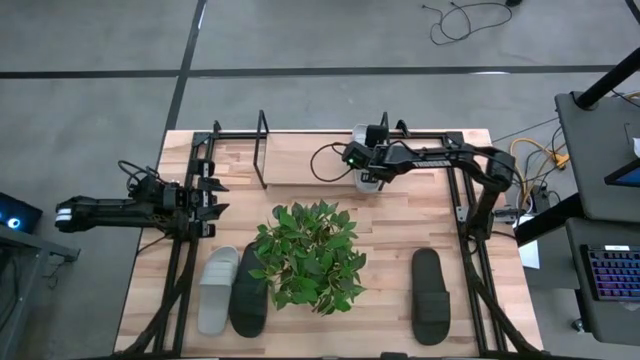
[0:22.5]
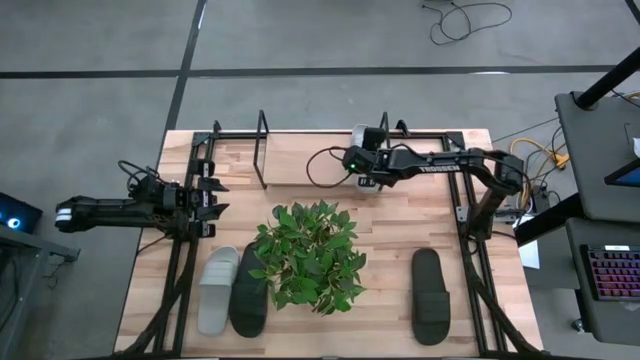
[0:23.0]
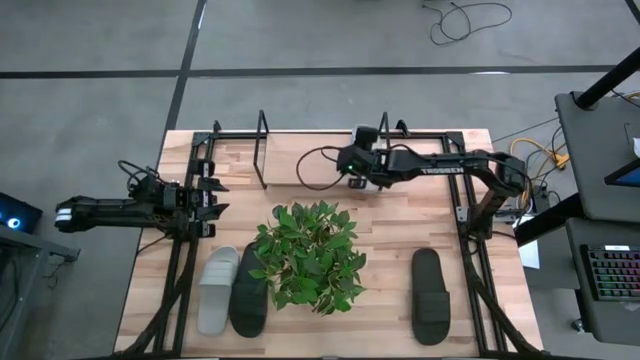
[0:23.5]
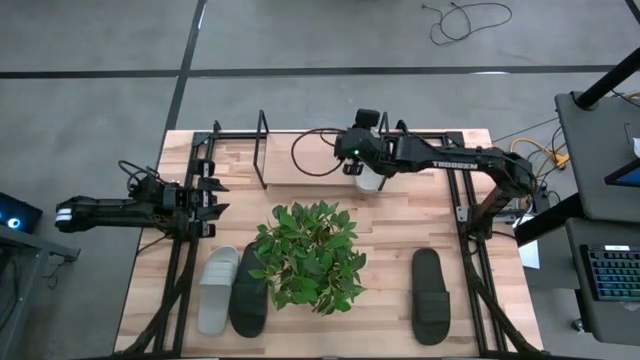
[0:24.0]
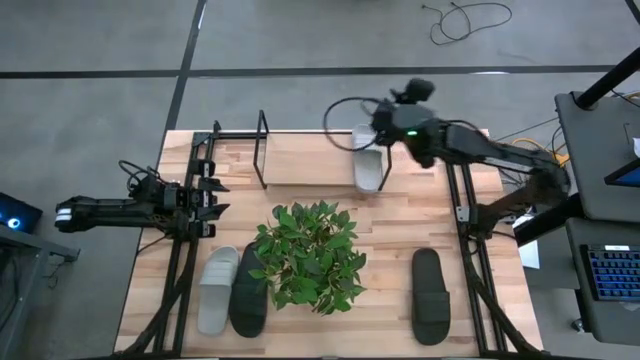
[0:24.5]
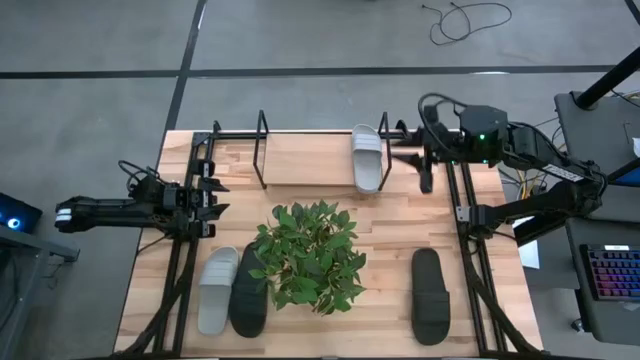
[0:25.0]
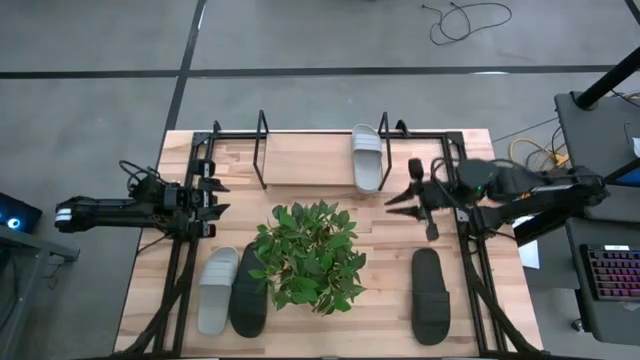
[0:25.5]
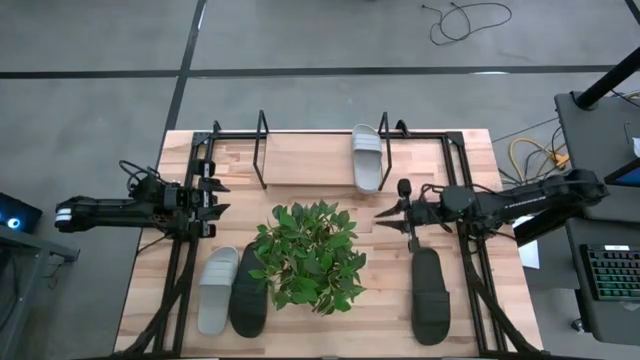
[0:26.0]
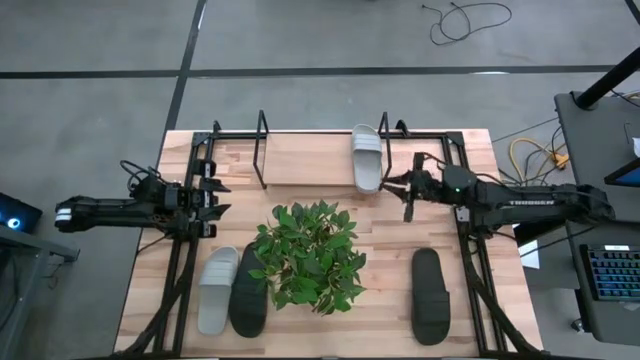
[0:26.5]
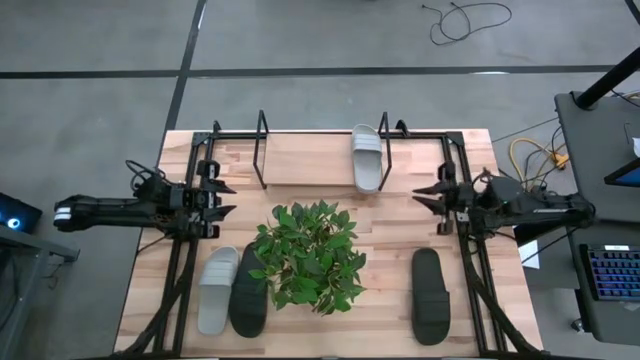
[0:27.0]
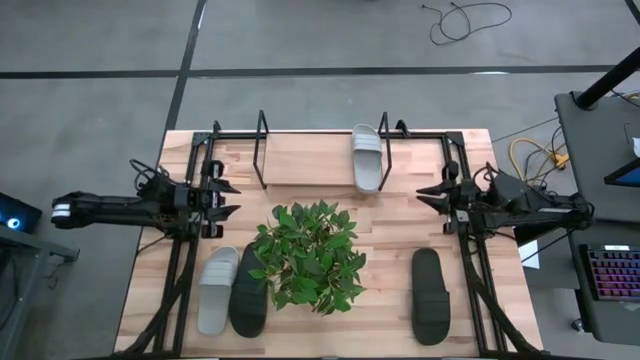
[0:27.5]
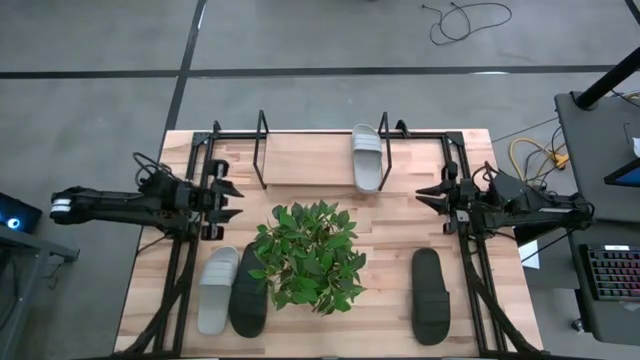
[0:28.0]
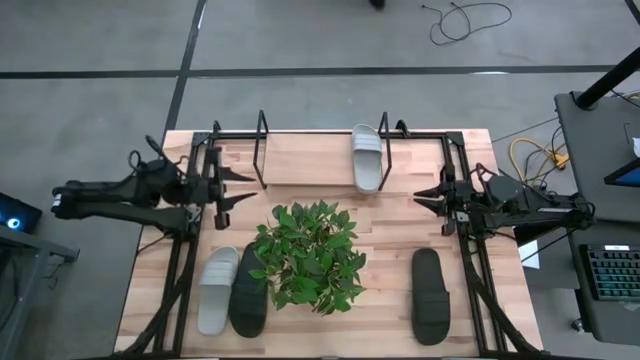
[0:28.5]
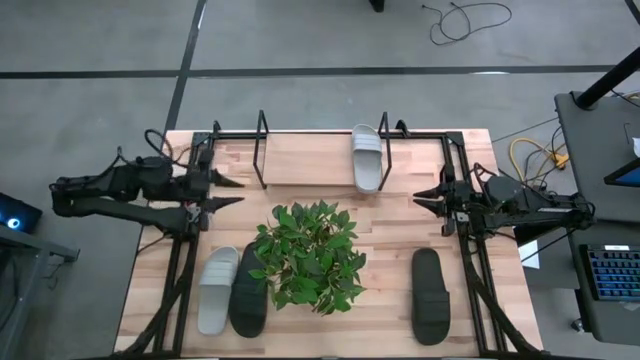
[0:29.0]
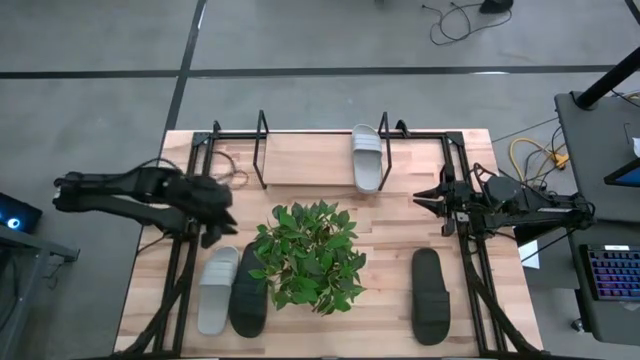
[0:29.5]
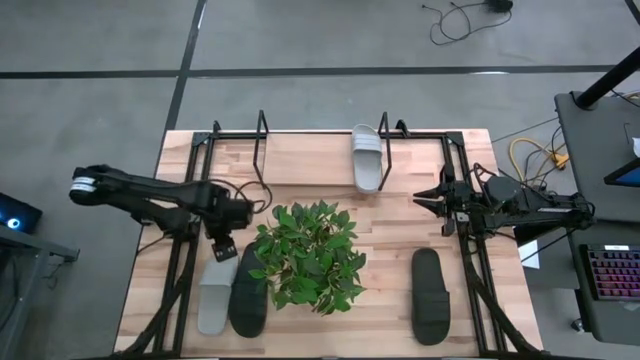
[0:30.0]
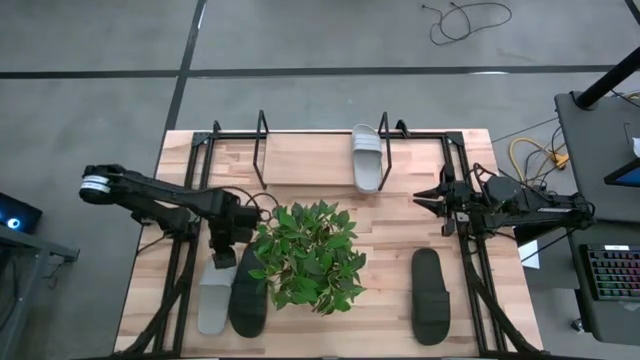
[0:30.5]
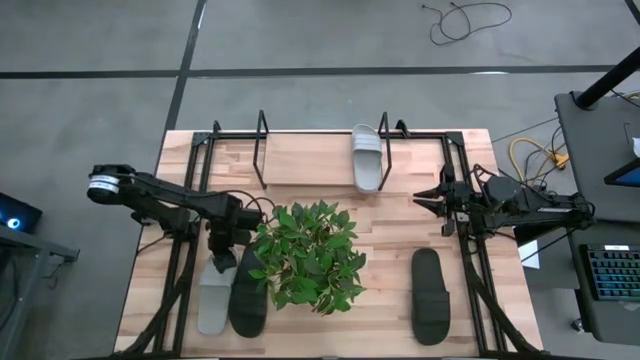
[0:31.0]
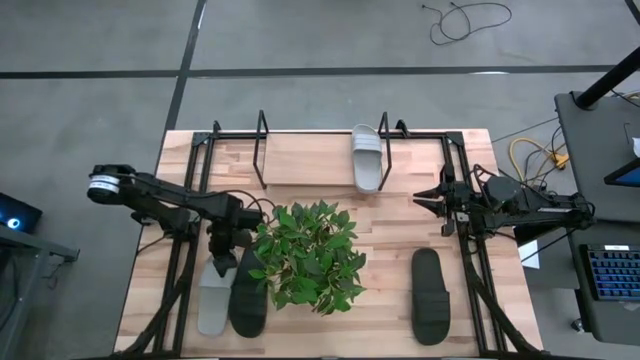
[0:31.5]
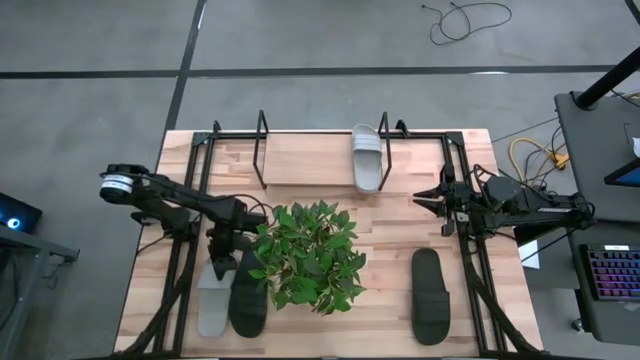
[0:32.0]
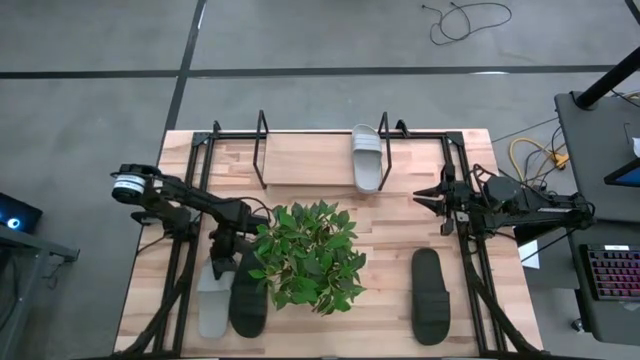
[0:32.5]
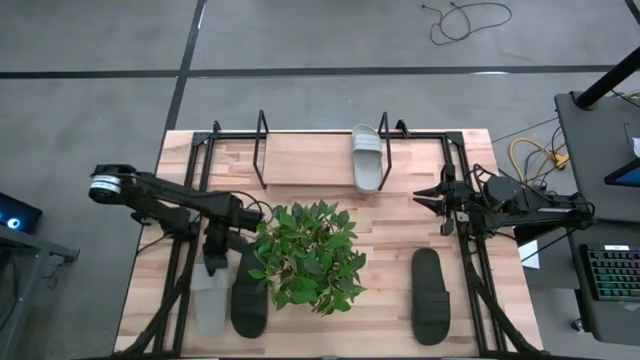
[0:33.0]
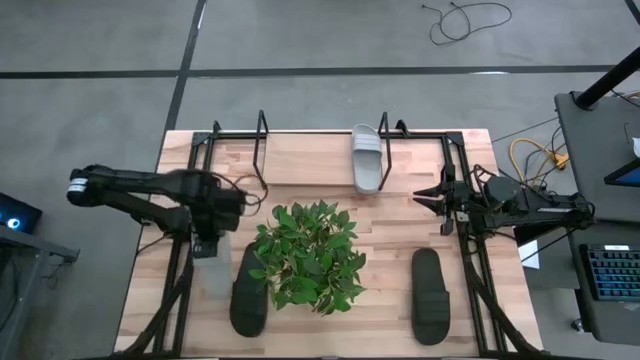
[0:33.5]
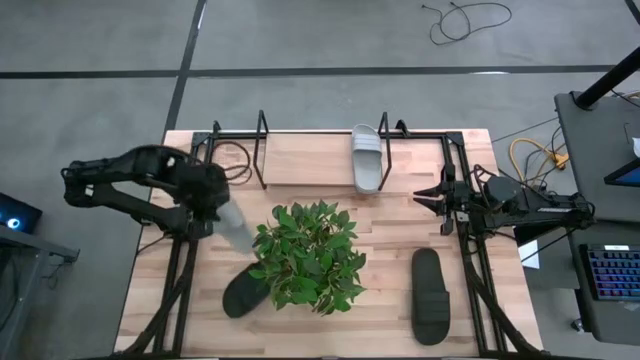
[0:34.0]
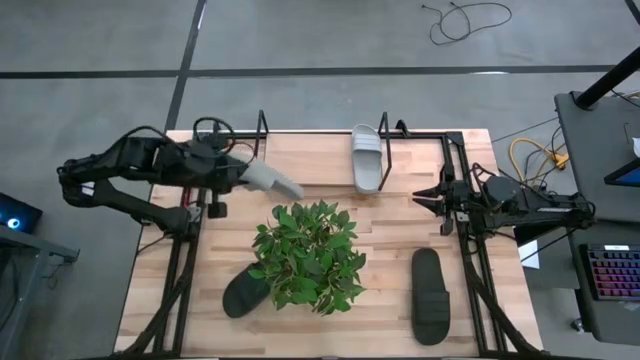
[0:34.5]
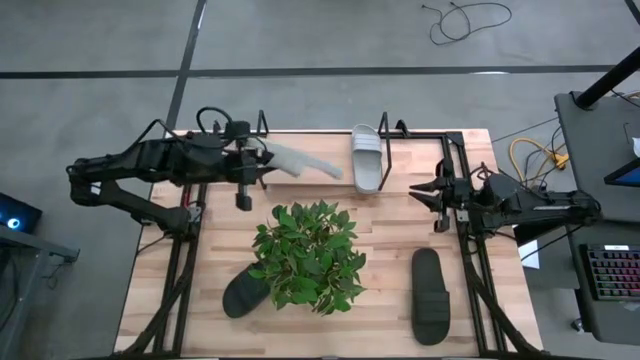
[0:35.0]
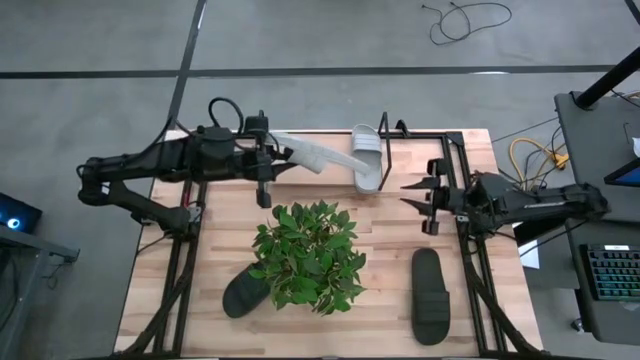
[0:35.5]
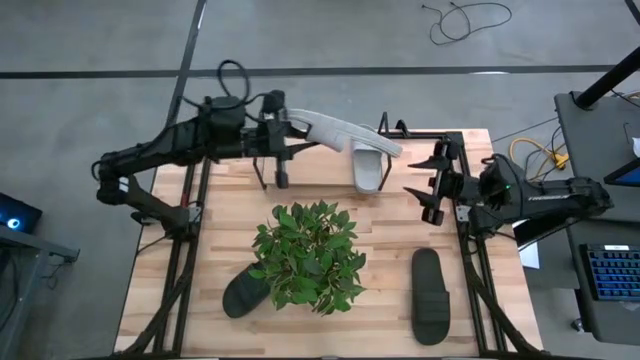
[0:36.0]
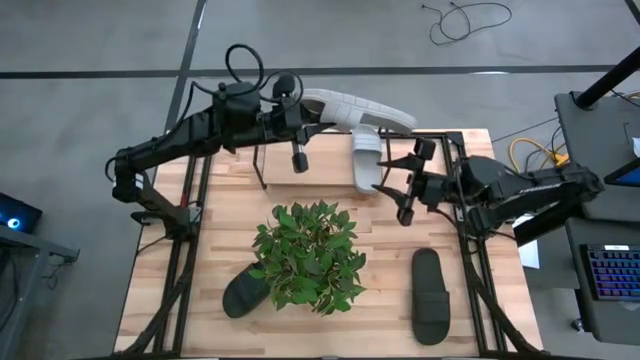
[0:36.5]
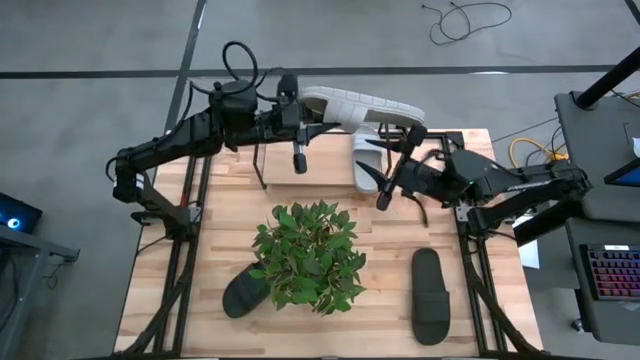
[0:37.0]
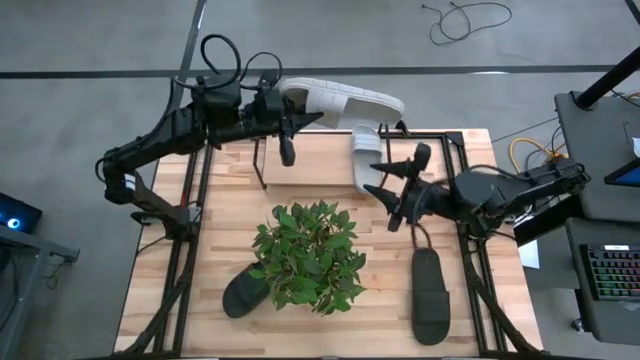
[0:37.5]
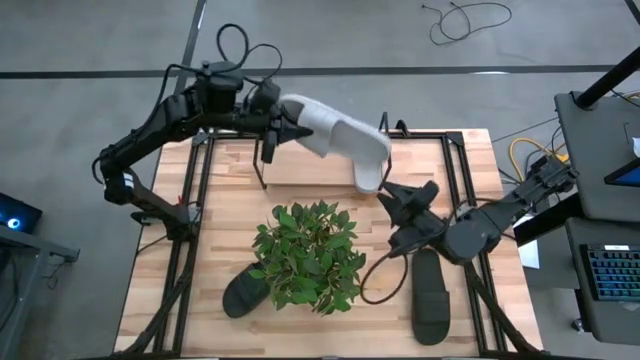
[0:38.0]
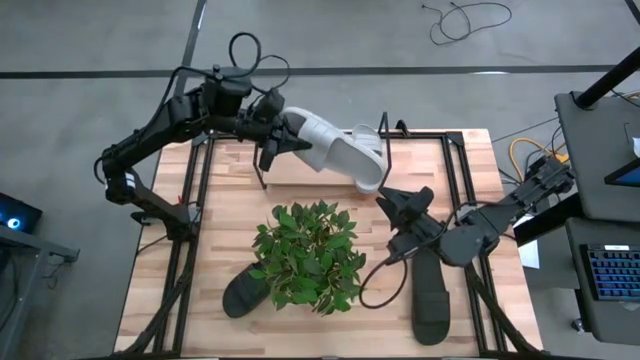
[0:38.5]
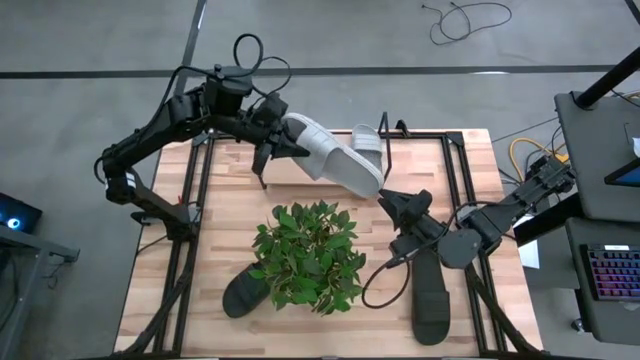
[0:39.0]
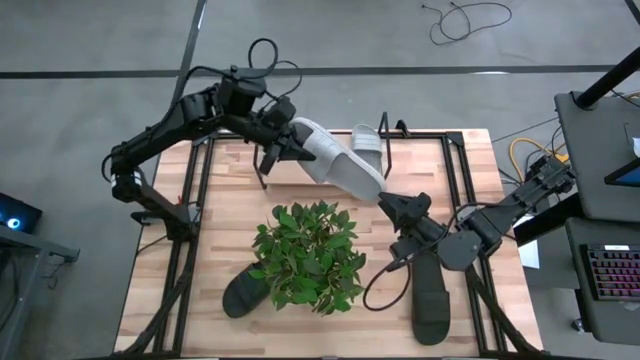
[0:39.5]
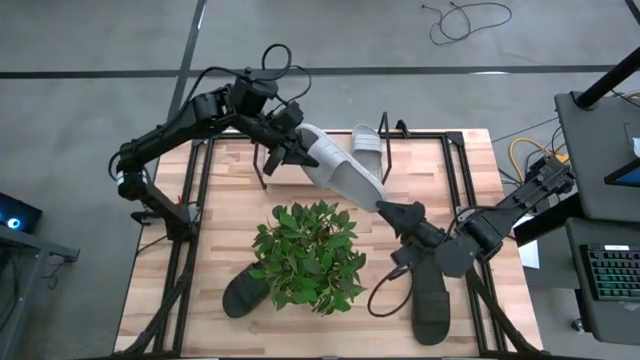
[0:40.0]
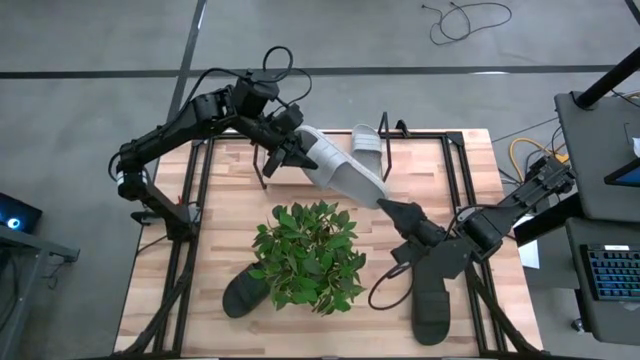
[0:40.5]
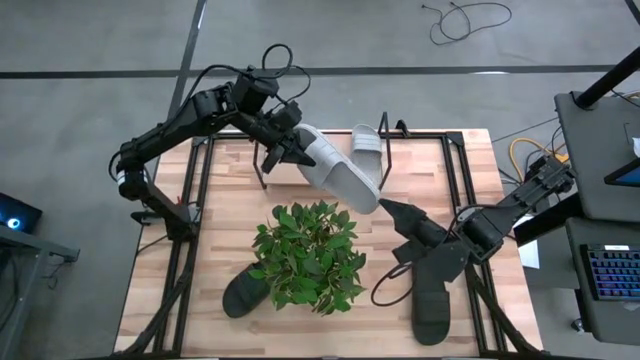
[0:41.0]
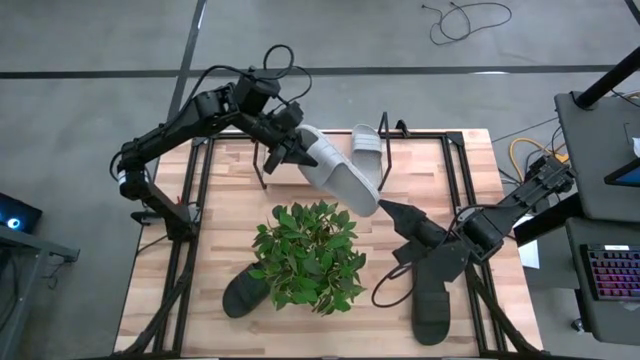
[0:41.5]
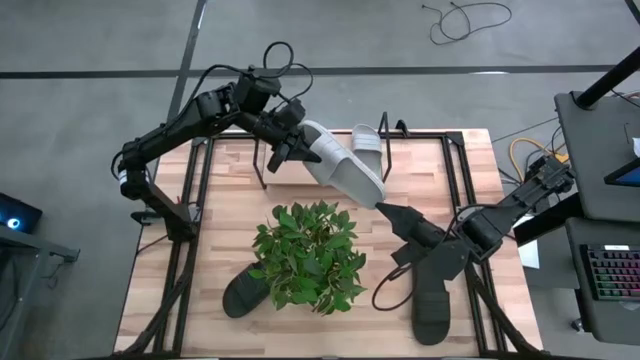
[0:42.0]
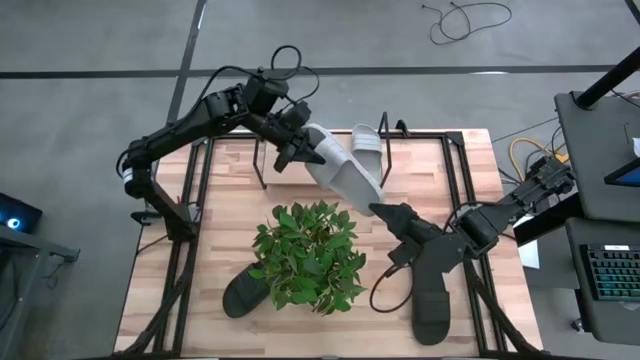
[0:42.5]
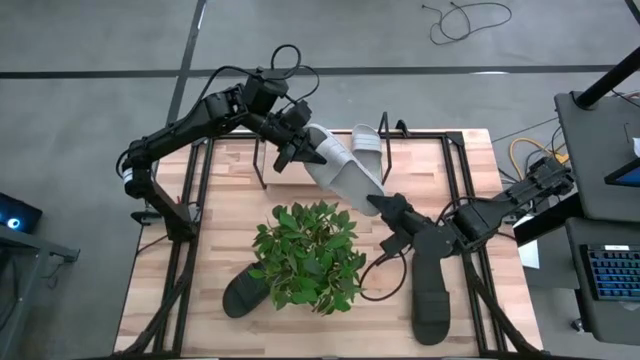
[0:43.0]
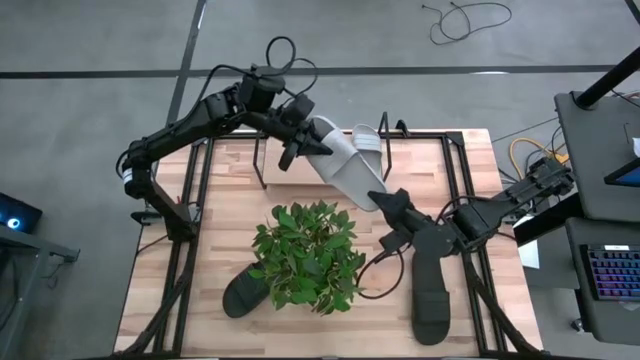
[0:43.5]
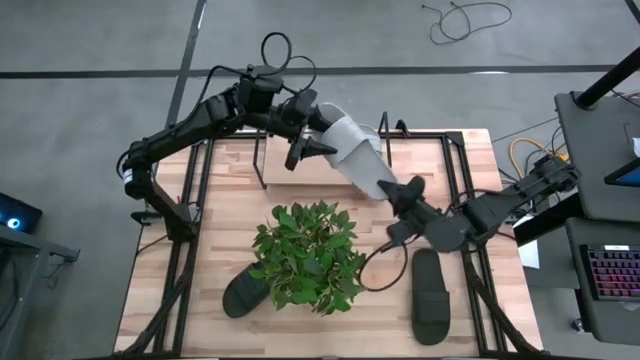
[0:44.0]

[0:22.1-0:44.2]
Task: Pick and place slides into the shelf
Put the gray slide on the shelf
